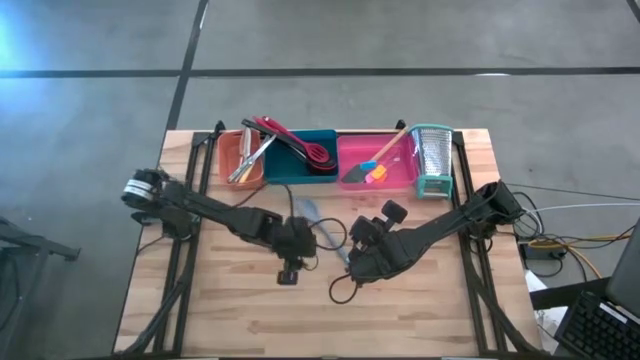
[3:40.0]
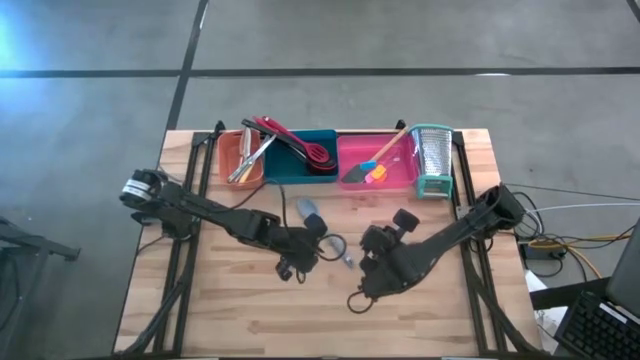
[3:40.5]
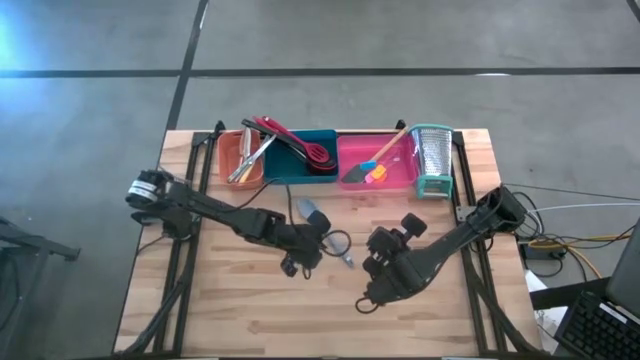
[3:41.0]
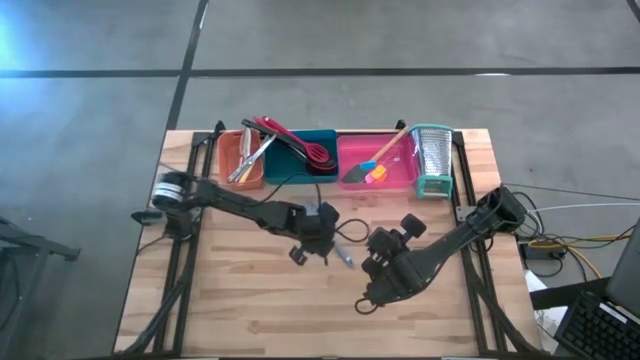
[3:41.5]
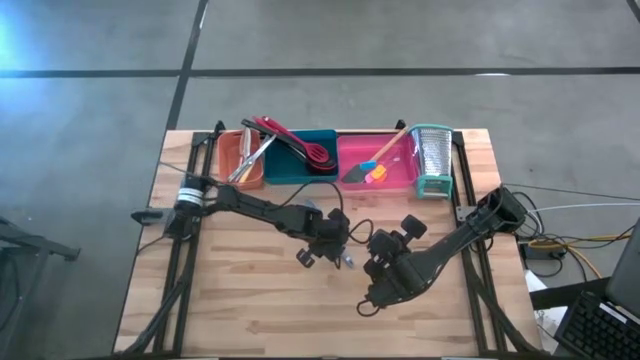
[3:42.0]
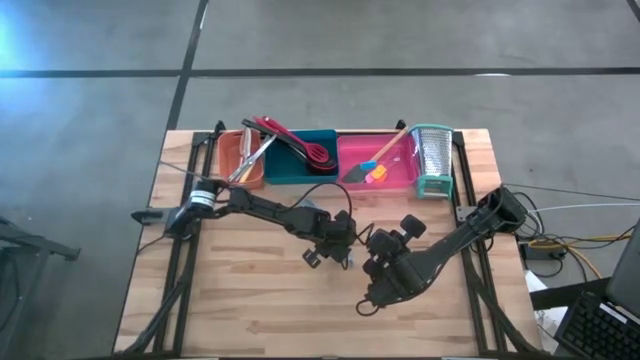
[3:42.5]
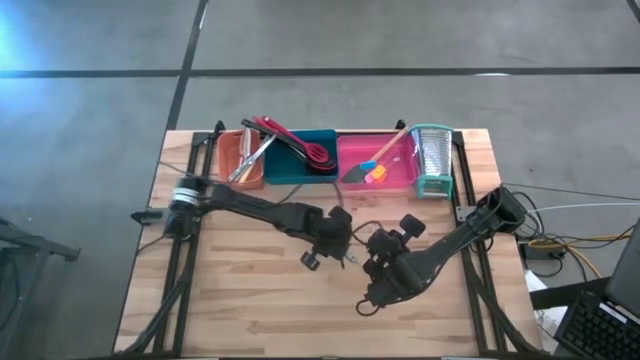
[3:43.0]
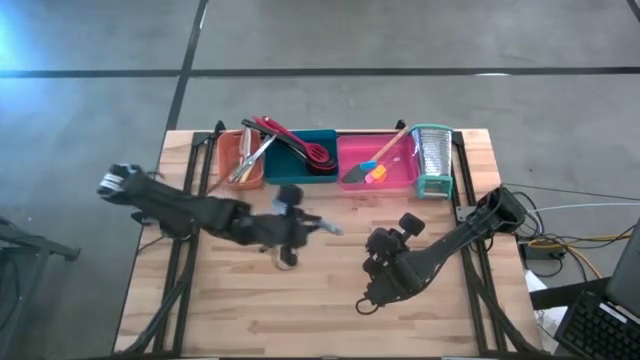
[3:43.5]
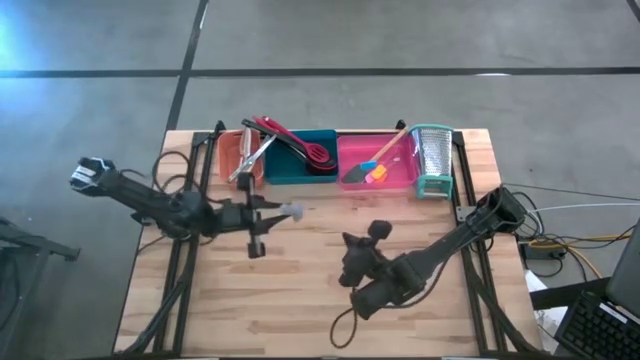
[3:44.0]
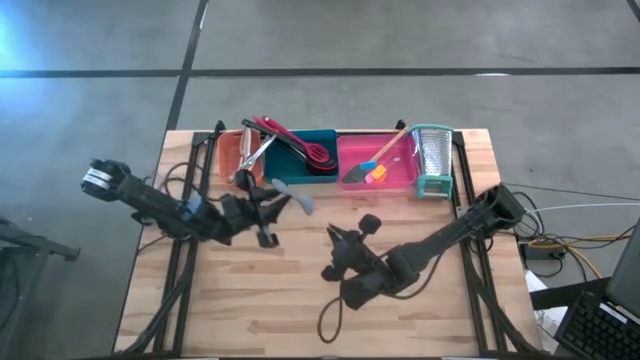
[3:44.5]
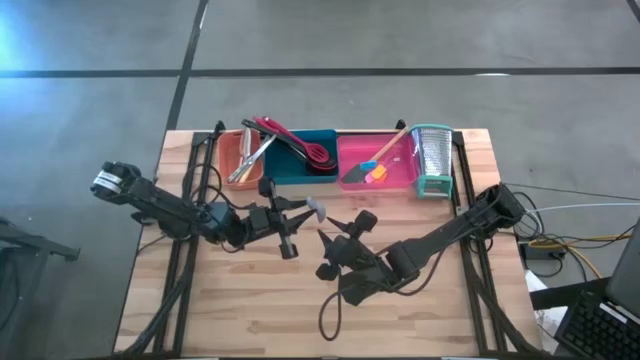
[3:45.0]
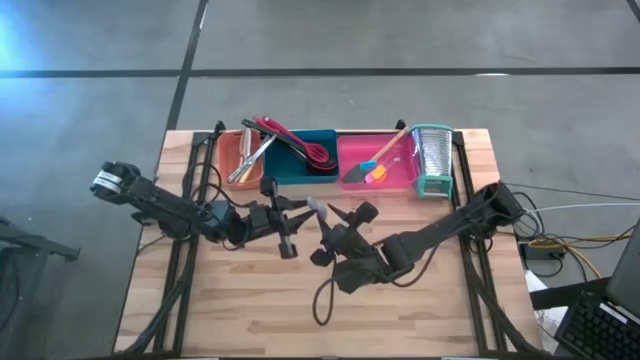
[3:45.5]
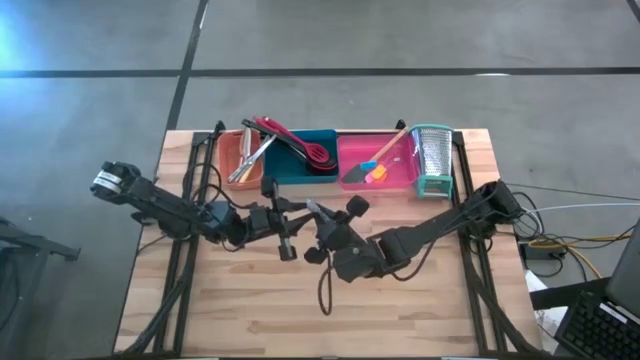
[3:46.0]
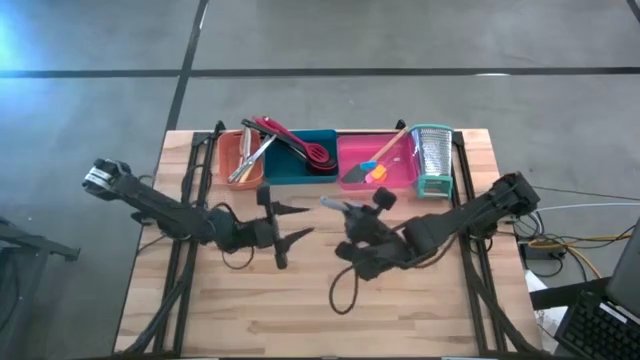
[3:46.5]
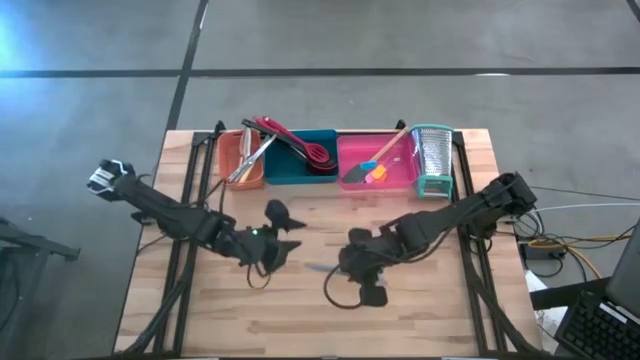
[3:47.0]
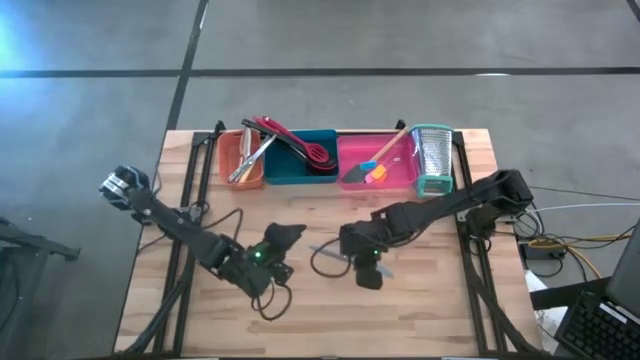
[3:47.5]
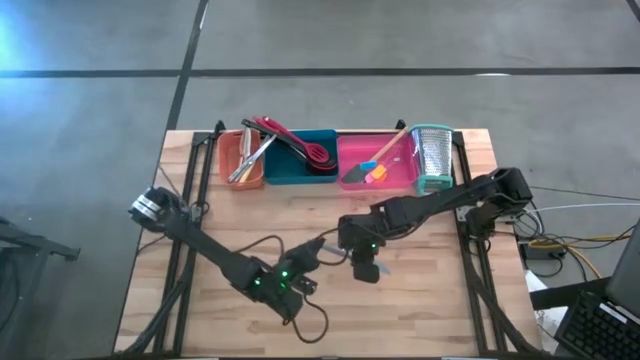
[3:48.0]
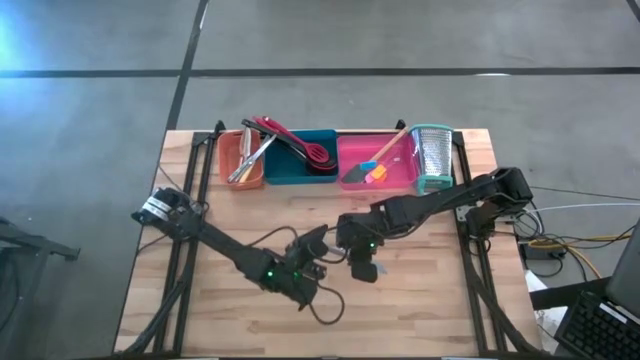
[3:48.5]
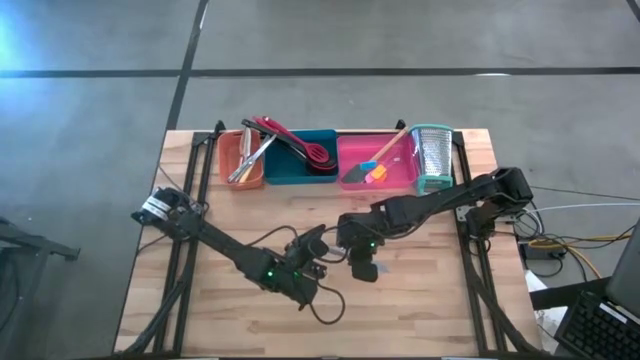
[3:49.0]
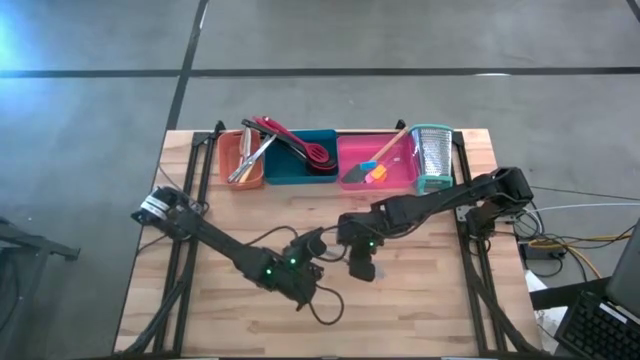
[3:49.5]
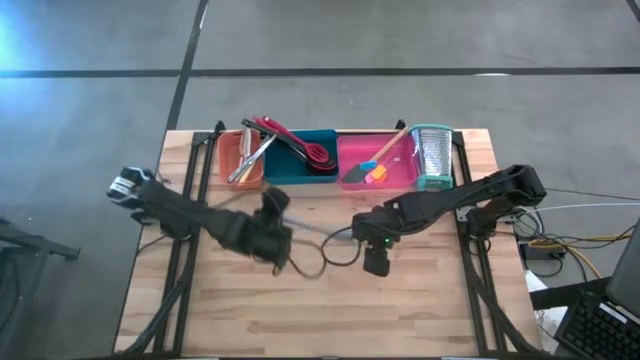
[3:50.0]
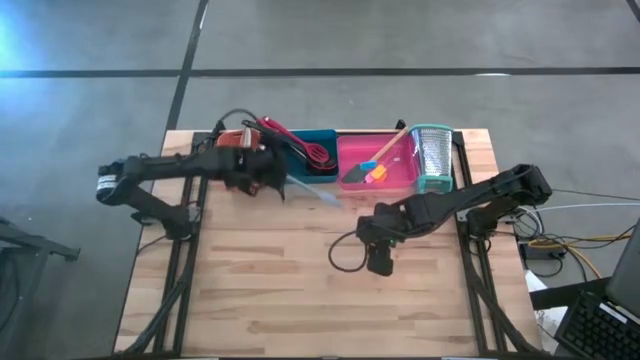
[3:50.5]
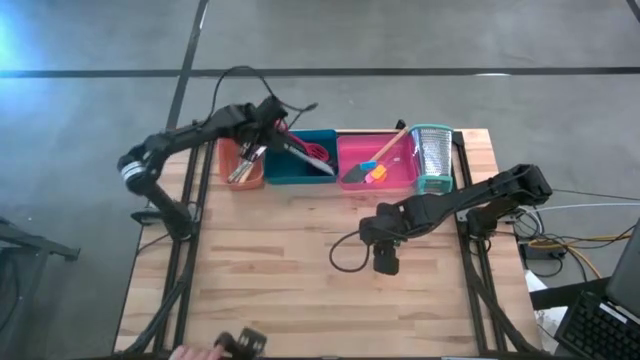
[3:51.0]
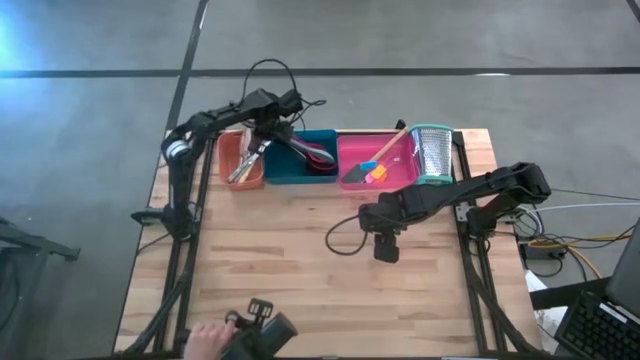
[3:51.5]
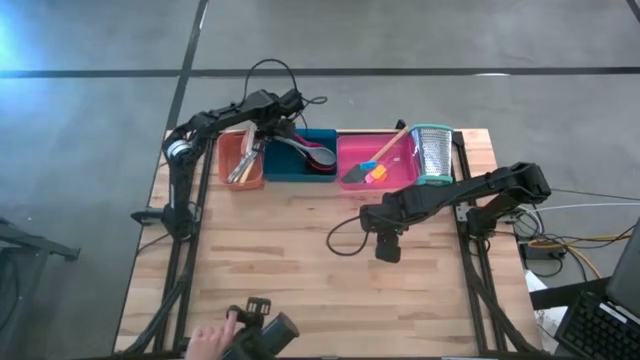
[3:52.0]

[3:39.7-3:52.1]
Task: Pick & Place Kitchen Items
Put the gray serving spoon into the blue bin

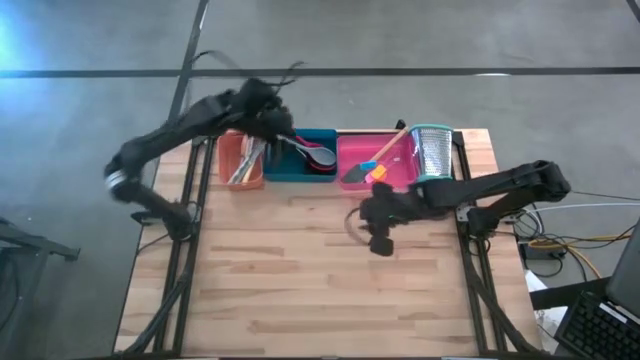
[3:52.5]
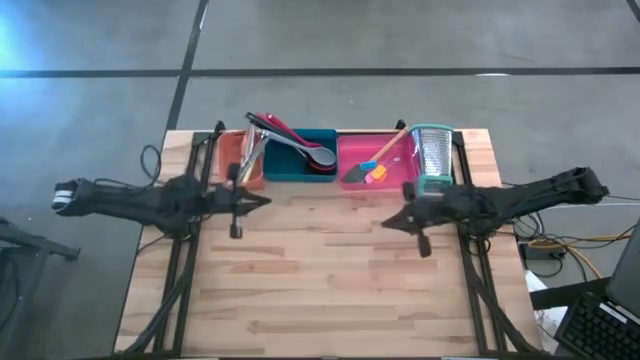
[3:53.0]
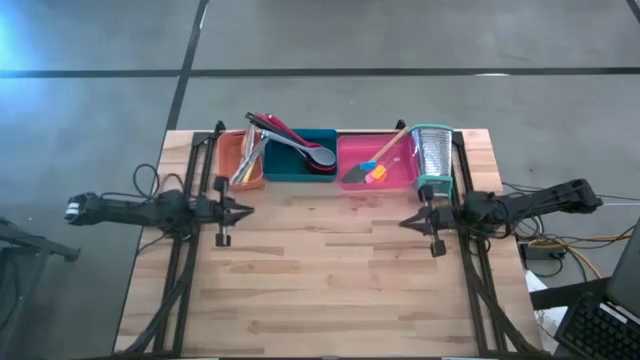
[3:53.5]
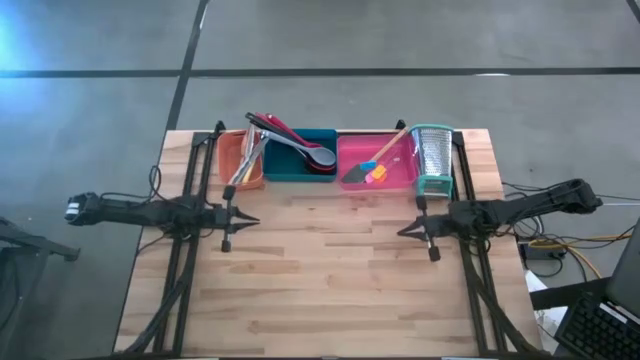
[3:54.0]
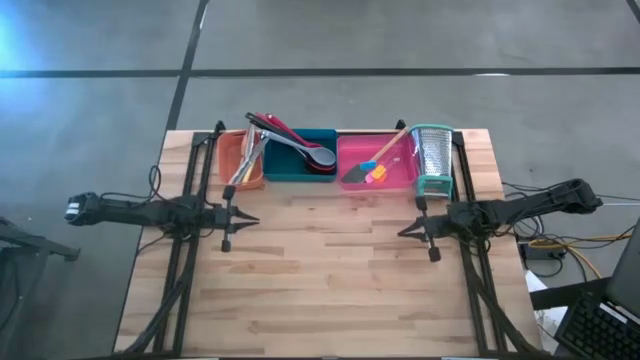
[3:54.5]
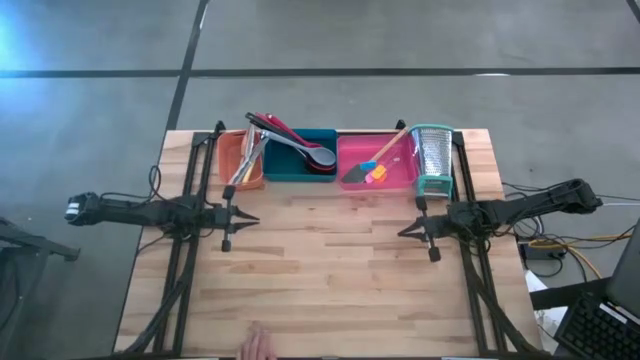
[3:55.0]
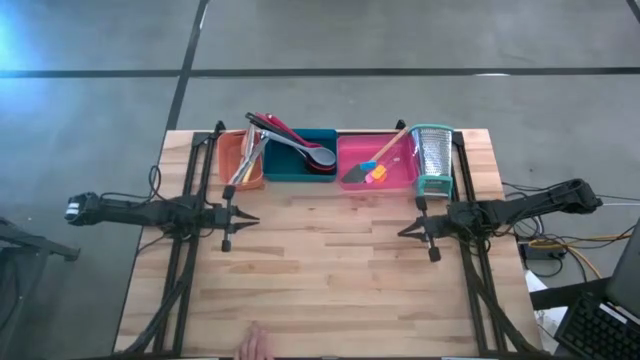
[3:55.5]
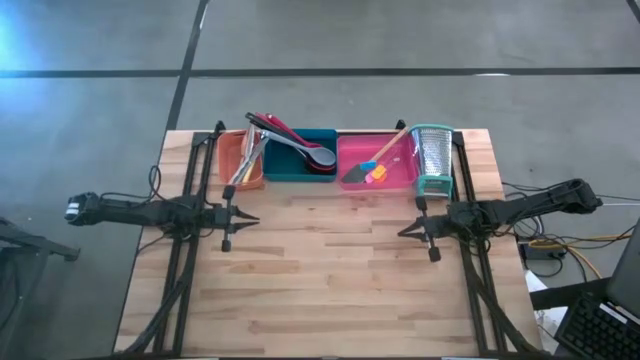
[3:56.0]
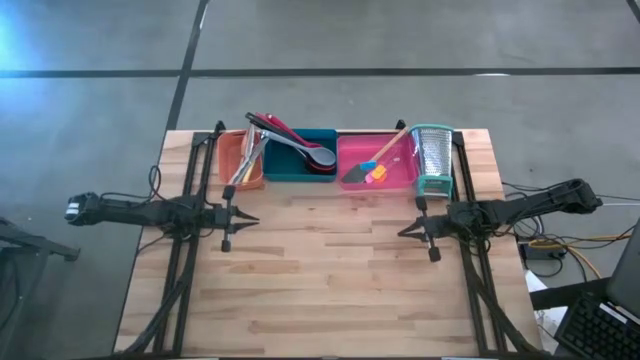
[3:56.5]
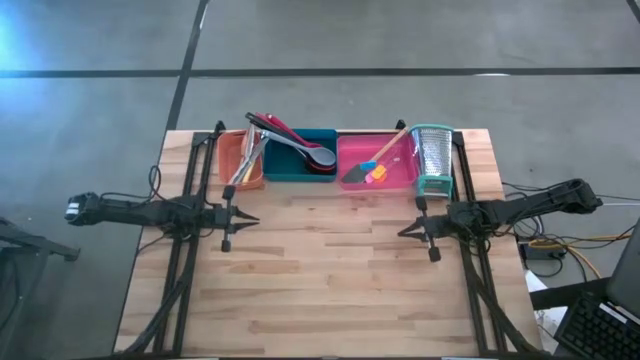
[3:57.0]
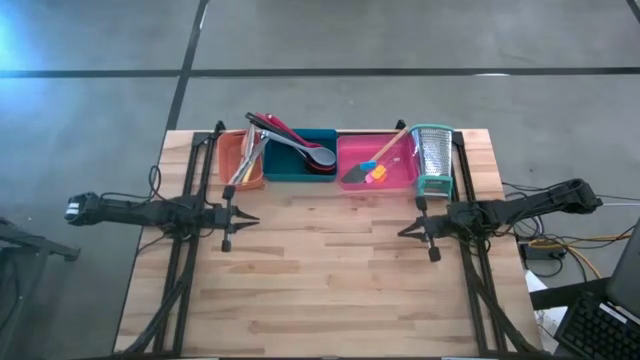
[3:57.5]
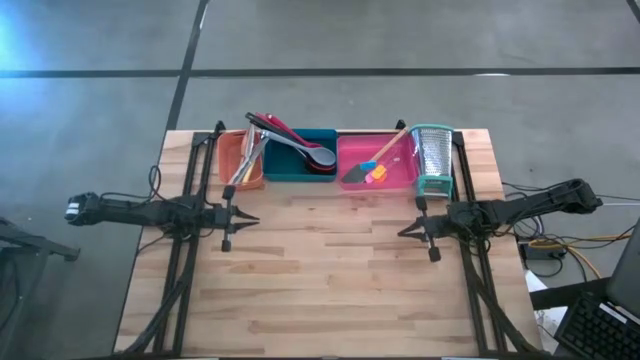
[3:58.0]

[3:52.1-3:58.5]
Return to Home Position

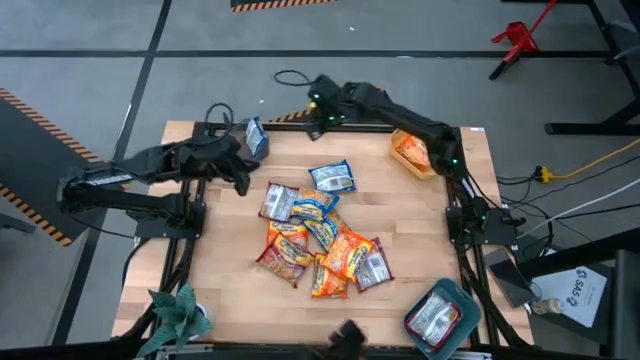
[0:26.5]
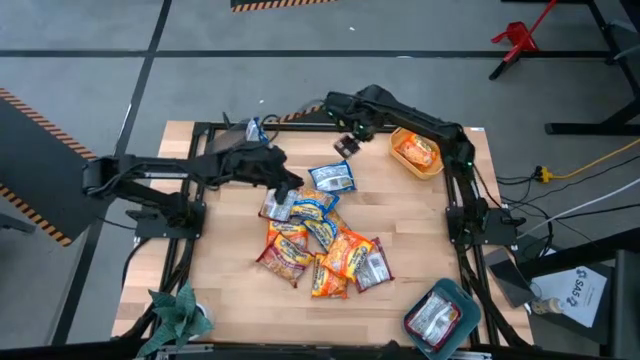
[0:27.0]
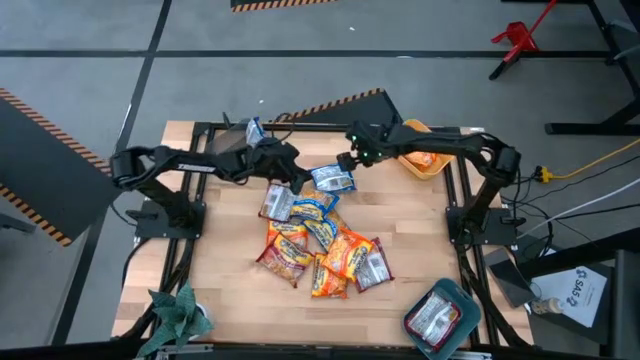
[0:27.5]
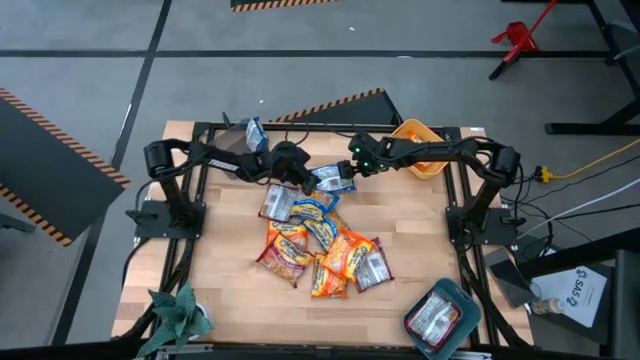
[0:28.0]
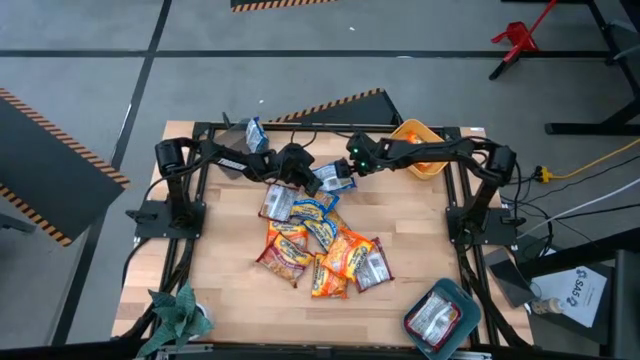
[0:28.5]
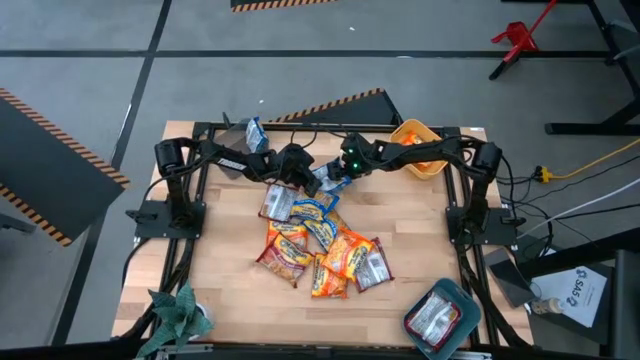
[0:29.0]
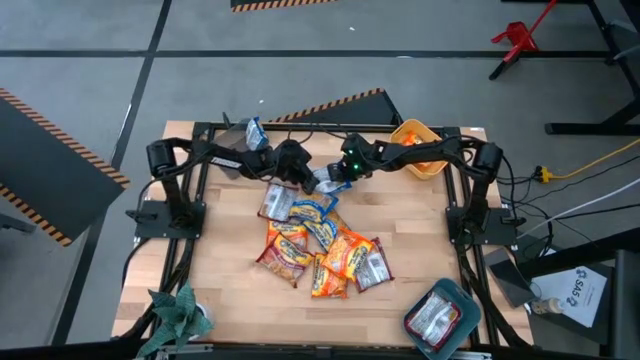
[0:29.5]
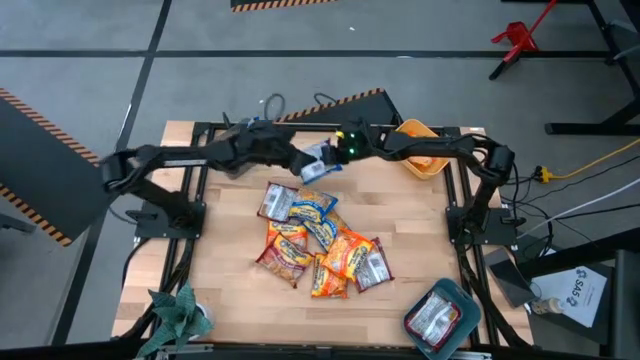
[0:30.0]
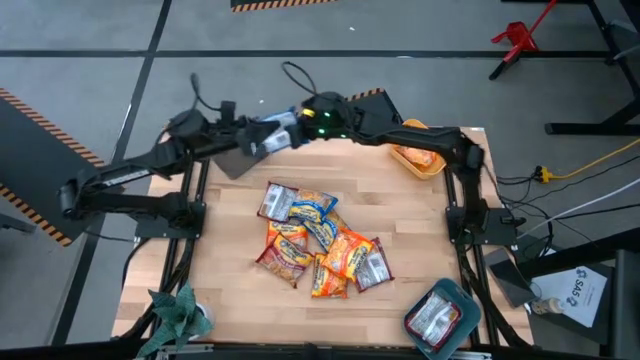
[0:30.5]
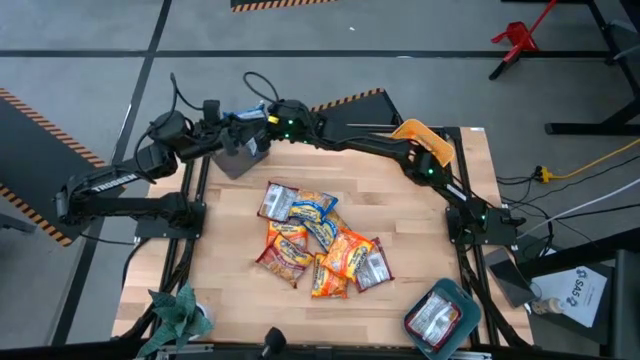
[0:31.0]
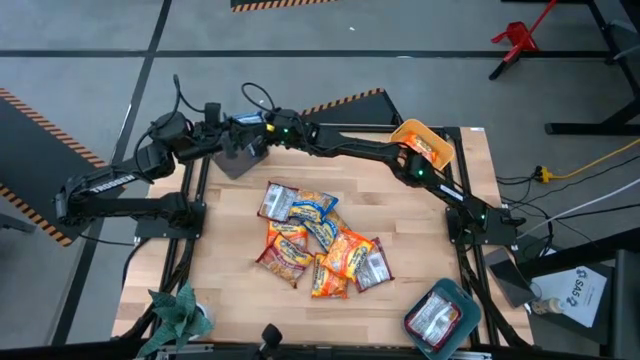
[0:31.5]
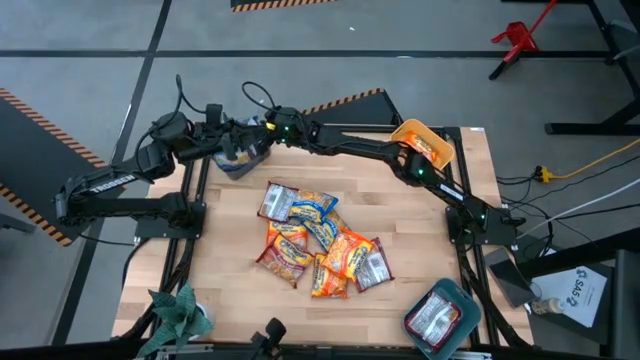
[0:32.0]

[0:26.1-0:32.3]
Task: Sort Maruchan noodles
Put the blue noodle pack into the black bin
